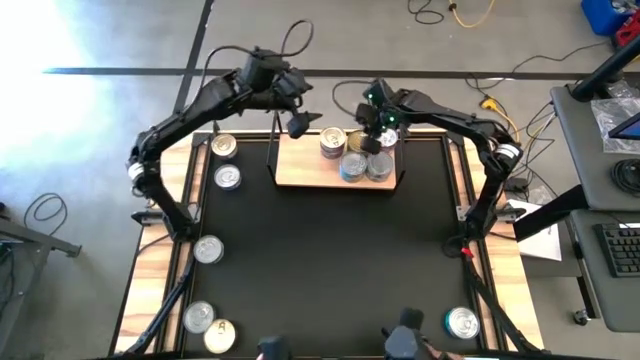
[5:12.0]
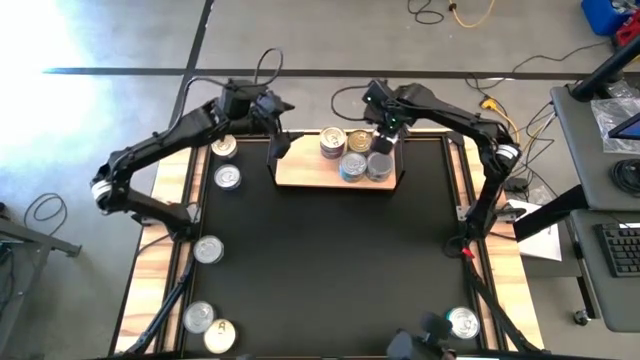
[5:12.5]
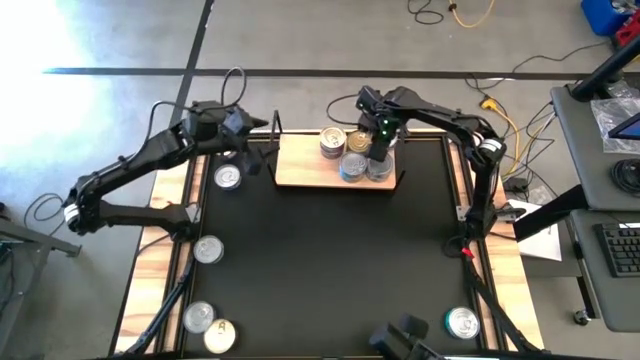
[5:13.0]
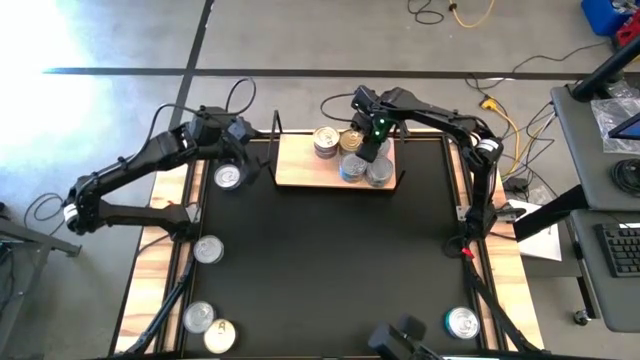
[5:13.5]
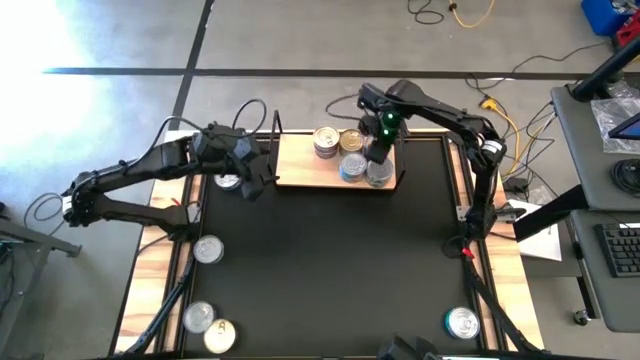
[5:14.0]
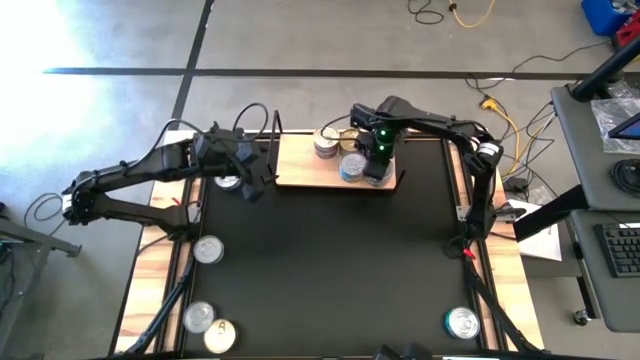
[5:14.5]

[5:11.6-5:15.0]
Task: Stack canned seafood by type on shelf
Adjust the tuna cans on the shelf

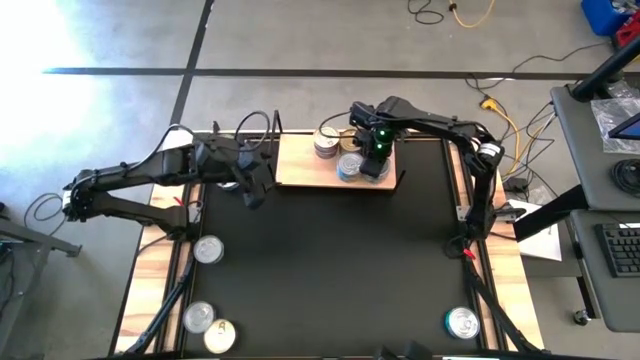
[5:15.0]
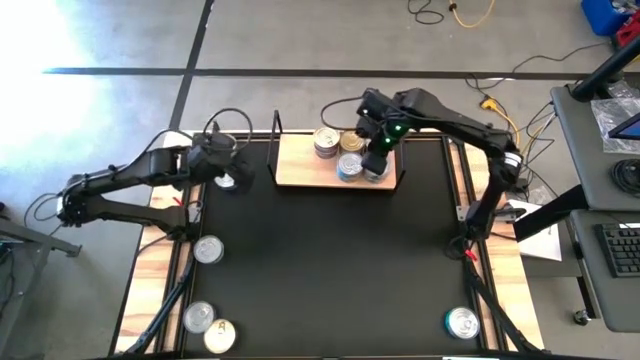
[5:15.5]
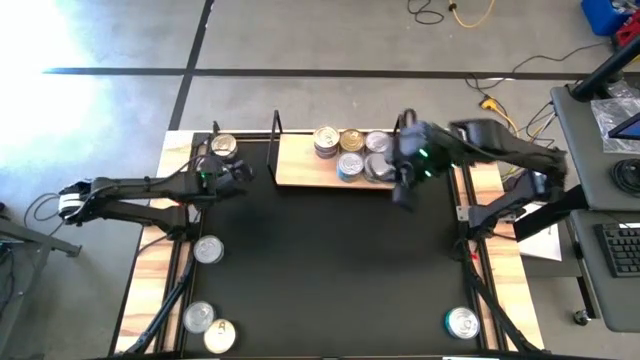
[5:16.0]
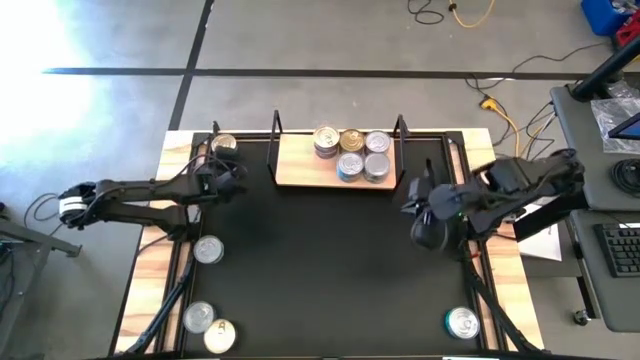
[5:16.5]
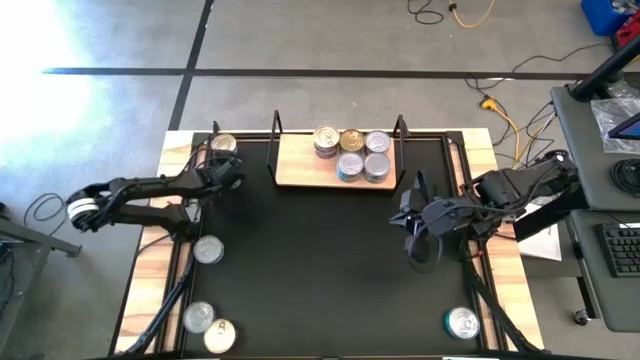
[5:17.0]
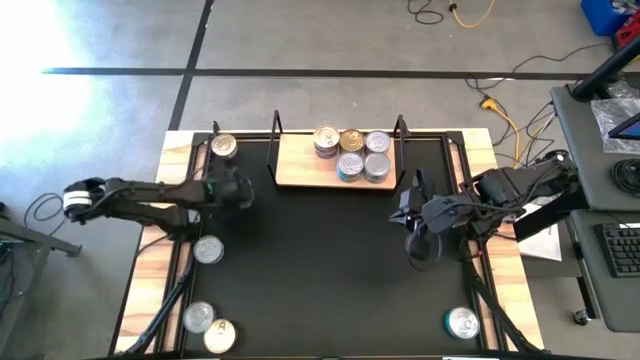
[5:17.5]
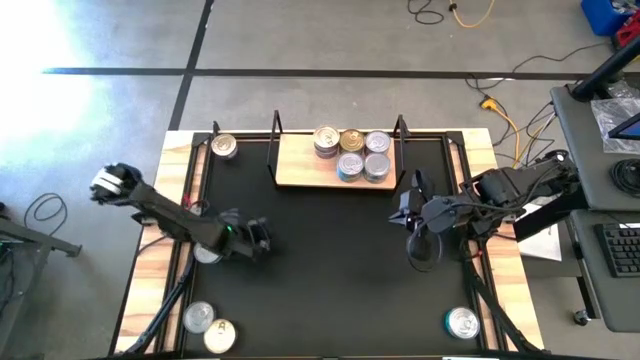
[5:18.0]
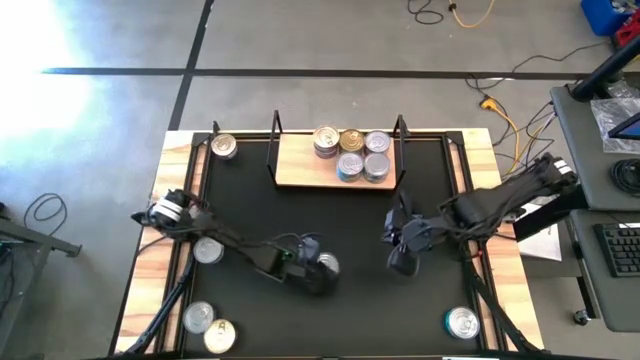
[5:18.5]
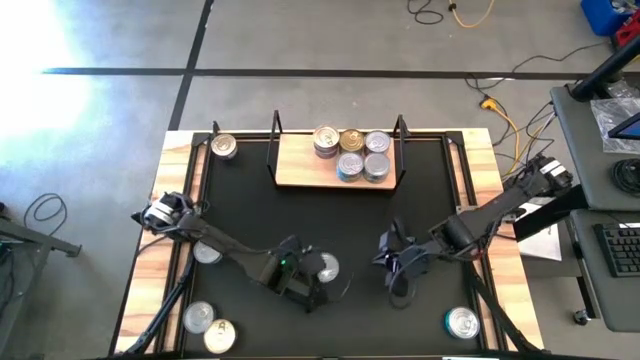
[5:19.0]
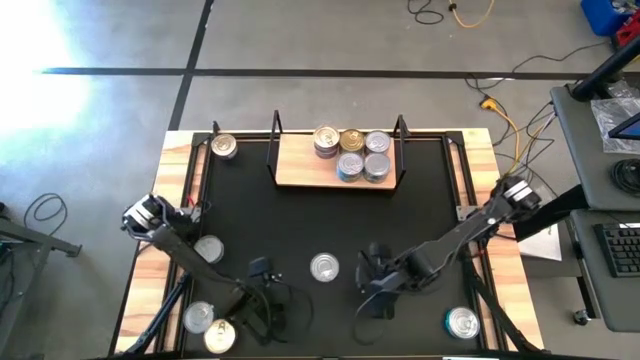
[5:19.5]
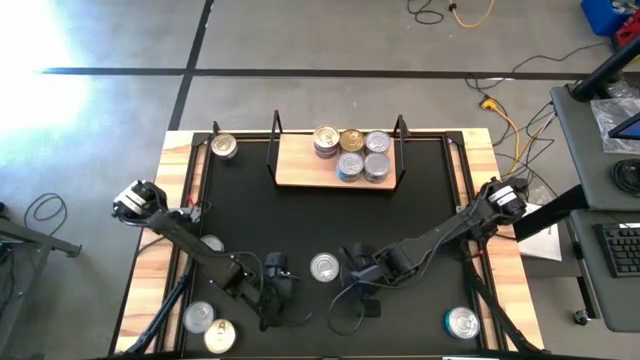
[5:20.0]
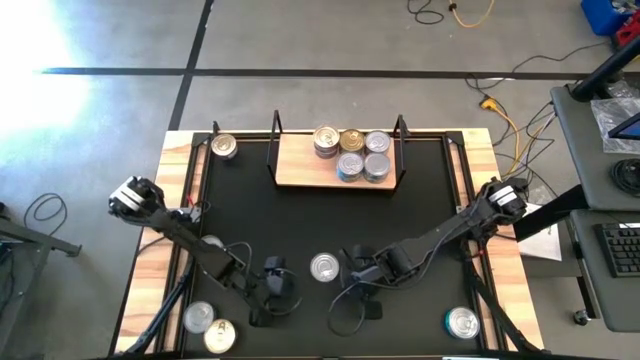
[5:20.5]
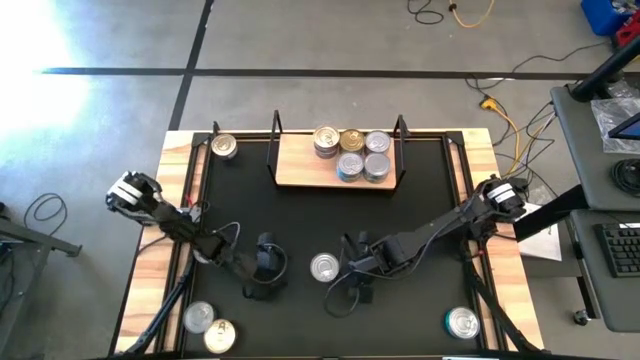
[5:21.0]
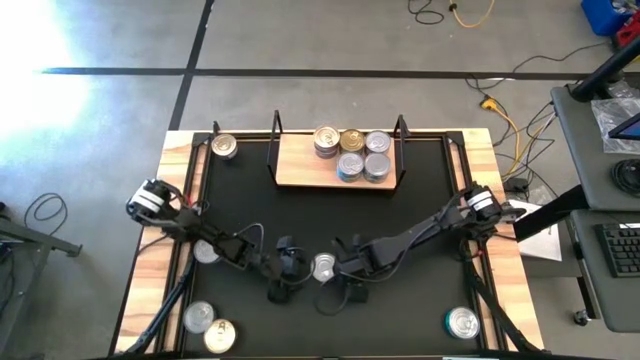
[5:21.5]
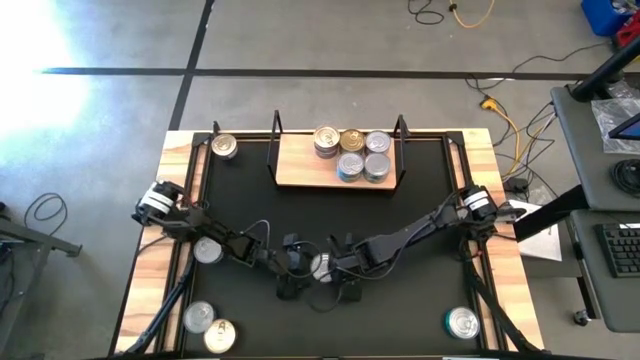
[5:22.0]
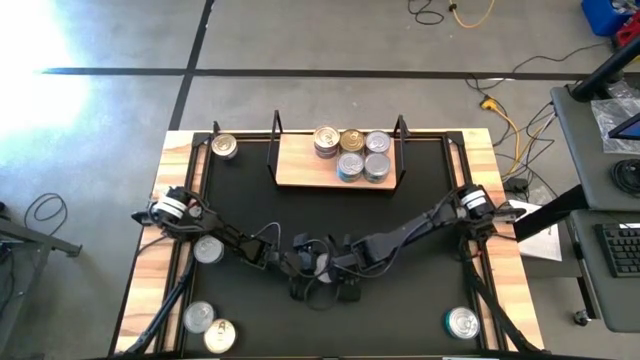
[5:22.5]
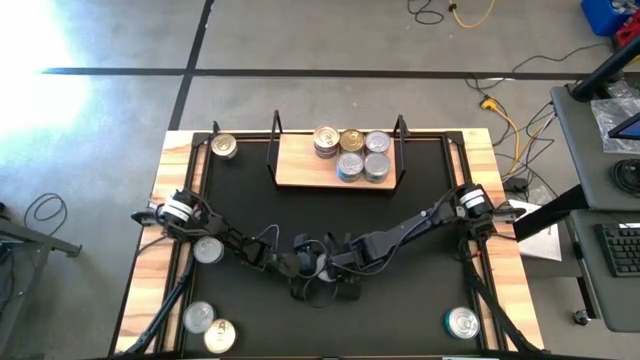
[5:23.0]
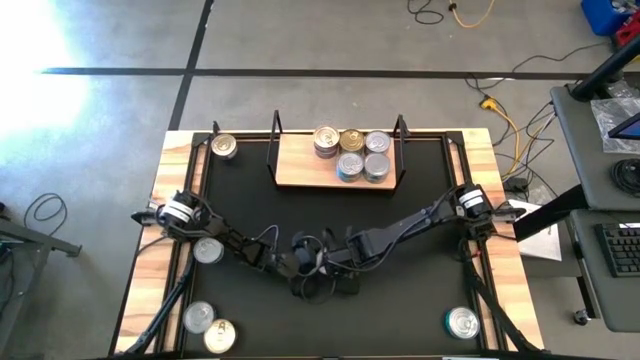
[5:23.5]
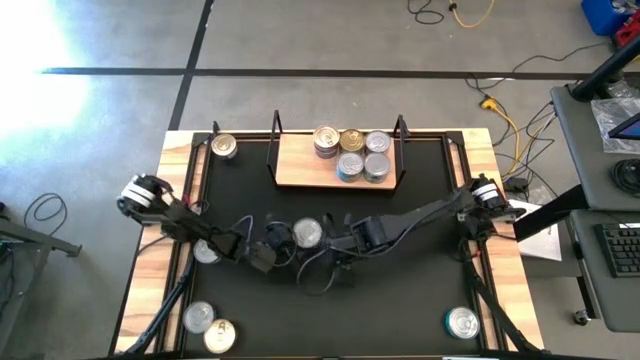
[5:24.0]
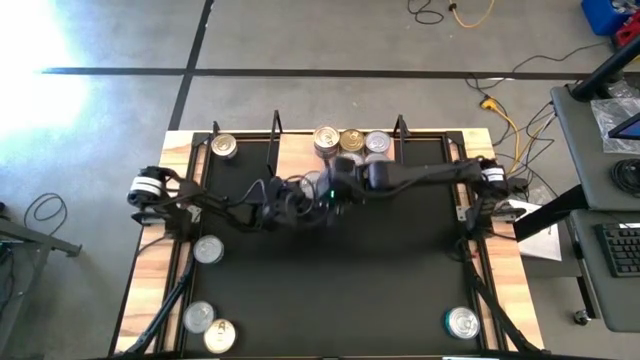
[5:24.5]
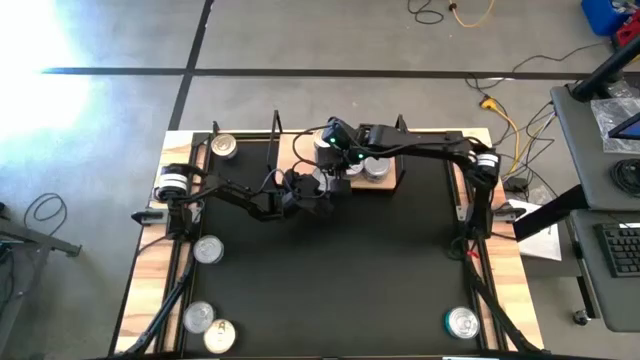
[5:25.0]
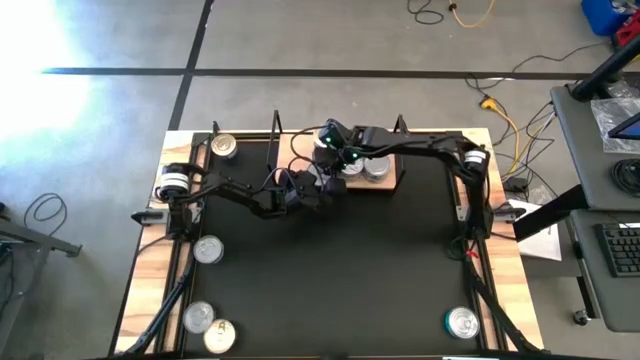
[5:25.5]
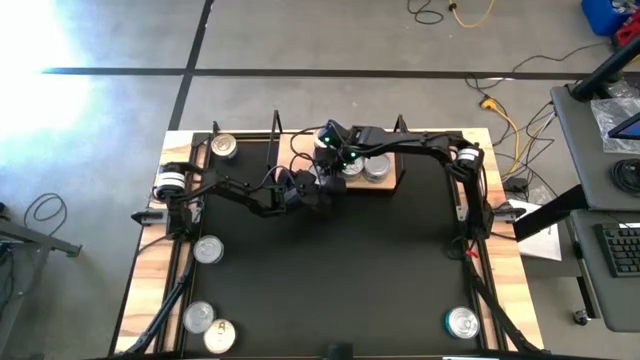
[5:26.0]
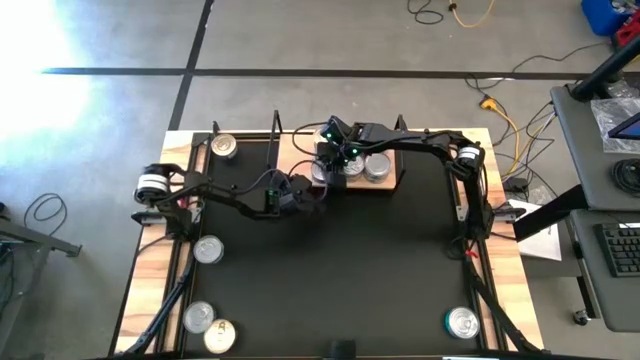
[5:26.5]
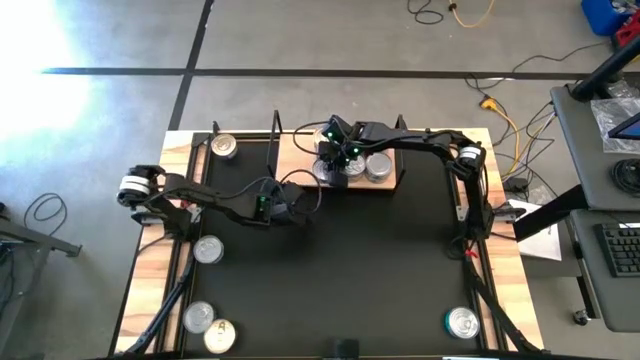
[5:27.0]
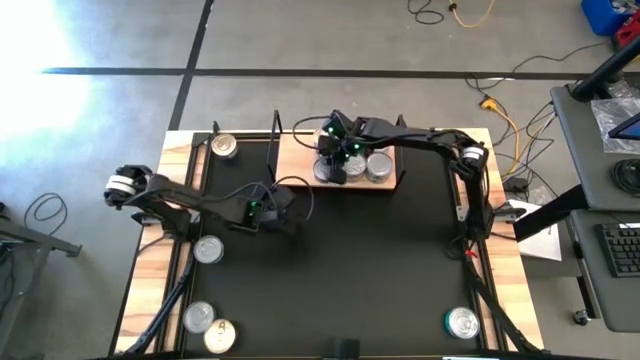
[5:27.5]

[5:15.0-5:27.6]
Put the blue tuna can on the shelf
